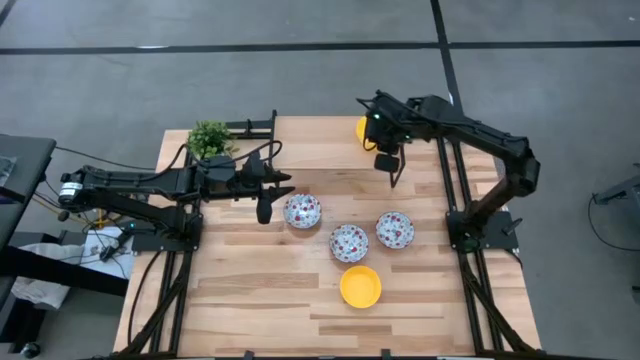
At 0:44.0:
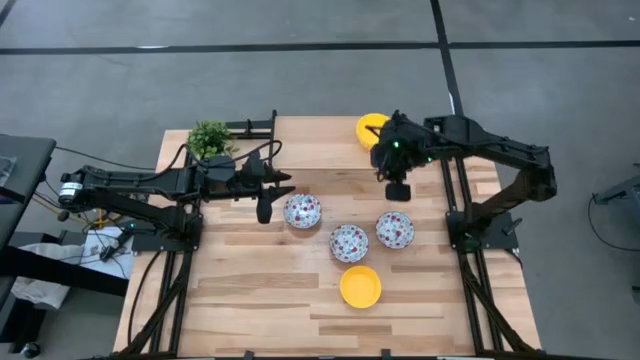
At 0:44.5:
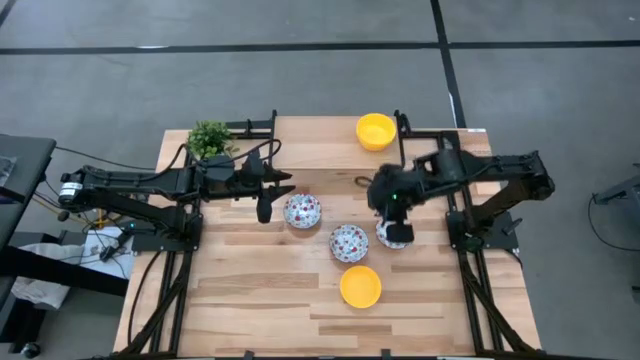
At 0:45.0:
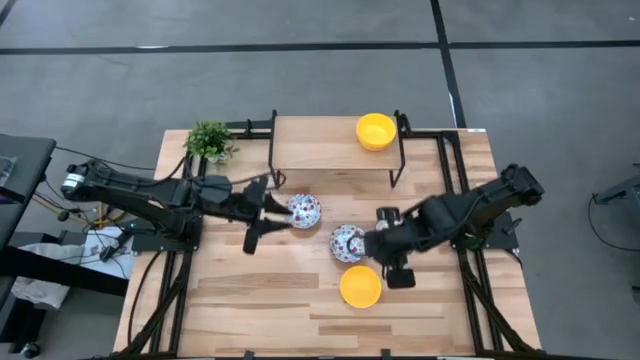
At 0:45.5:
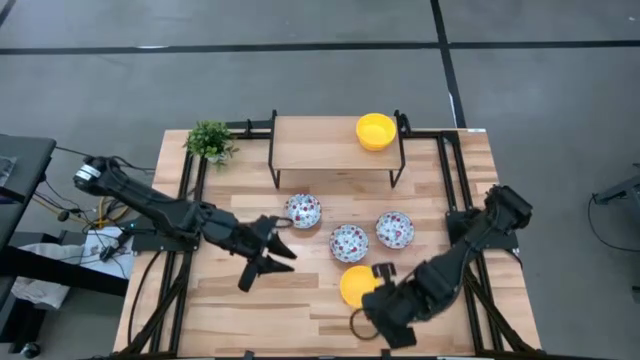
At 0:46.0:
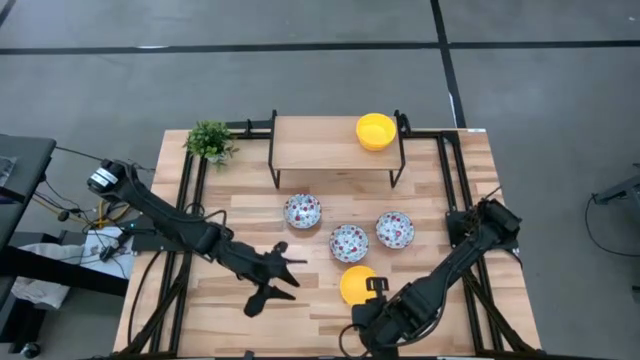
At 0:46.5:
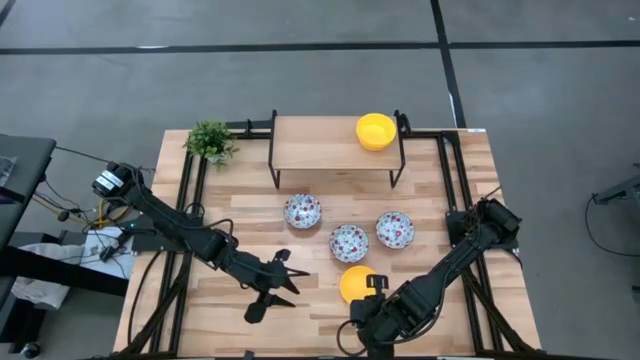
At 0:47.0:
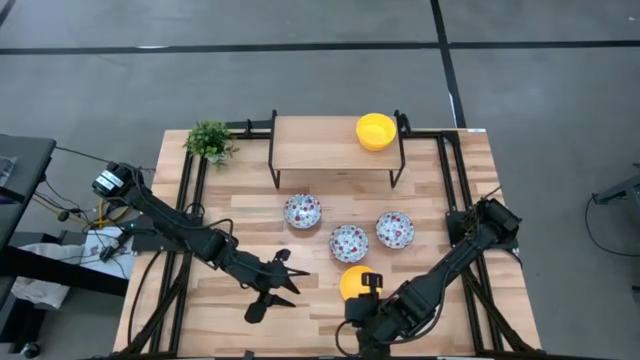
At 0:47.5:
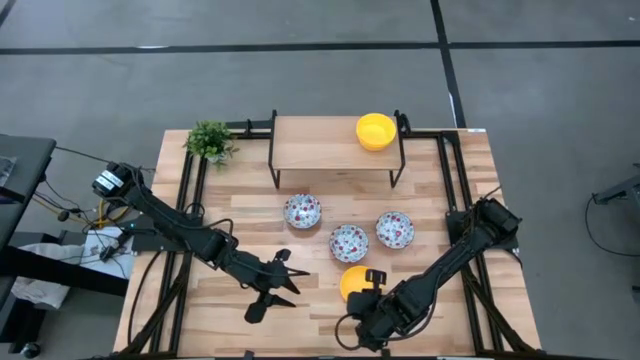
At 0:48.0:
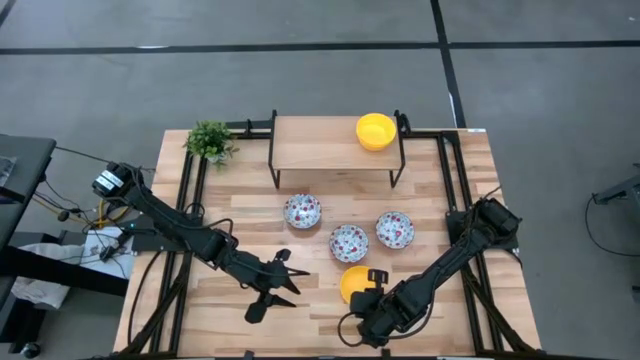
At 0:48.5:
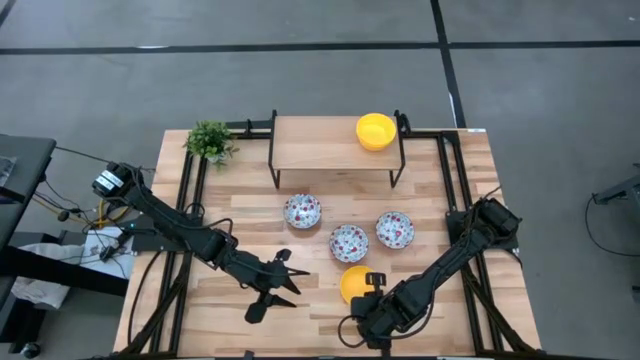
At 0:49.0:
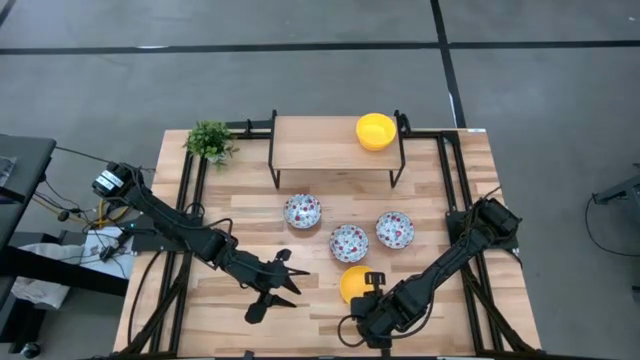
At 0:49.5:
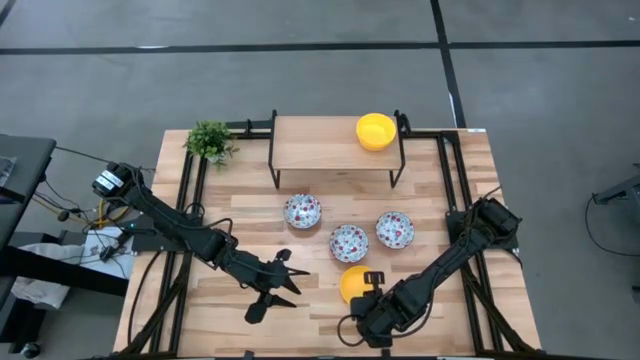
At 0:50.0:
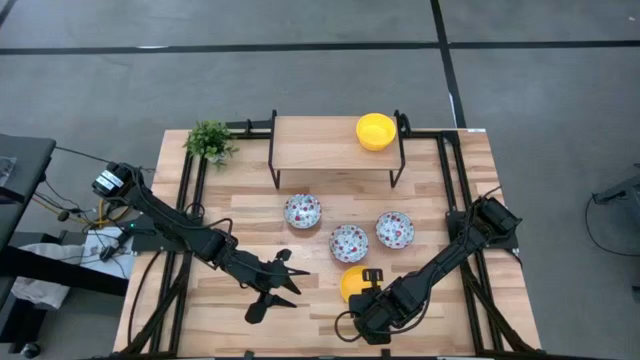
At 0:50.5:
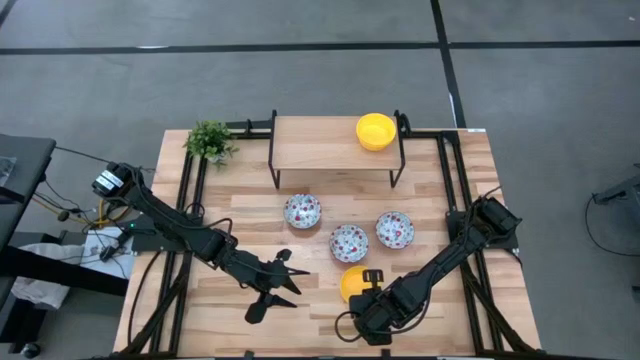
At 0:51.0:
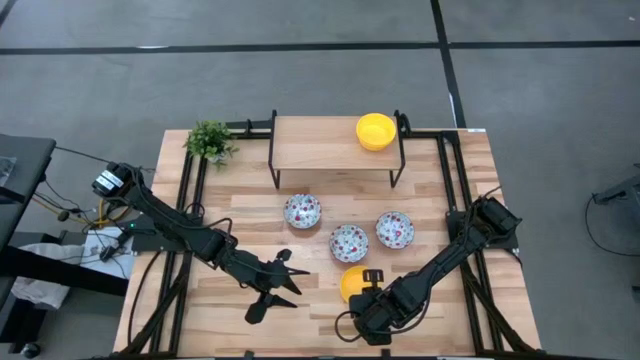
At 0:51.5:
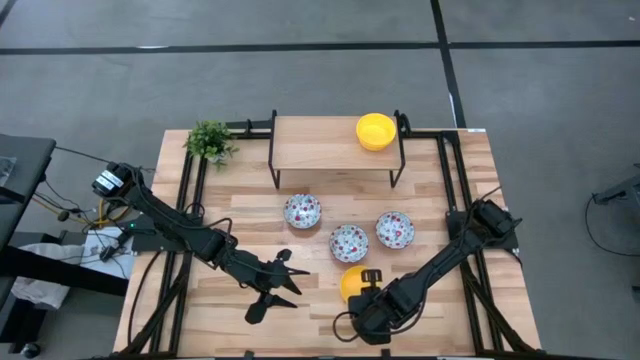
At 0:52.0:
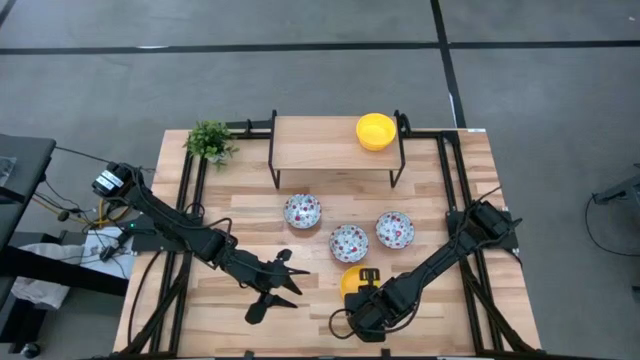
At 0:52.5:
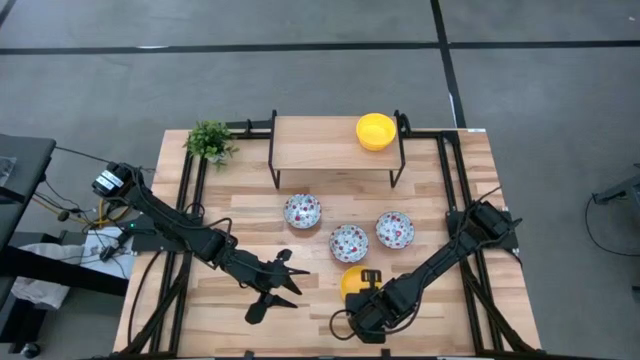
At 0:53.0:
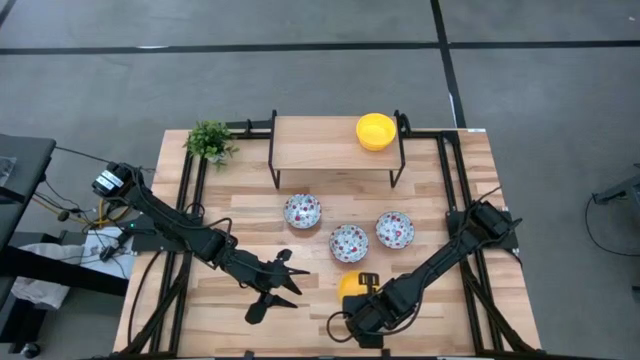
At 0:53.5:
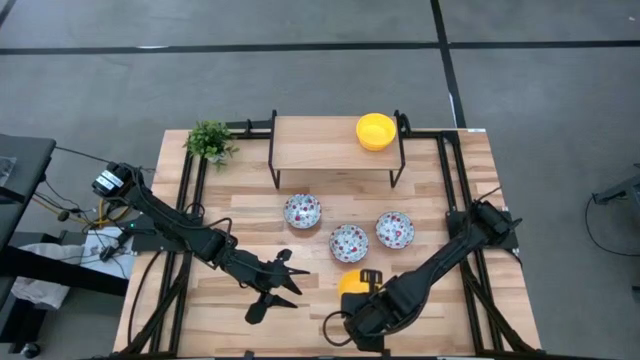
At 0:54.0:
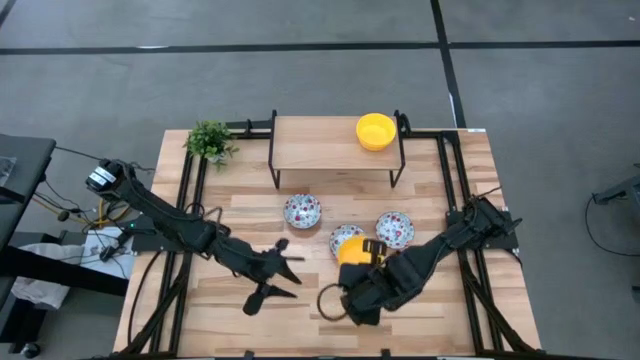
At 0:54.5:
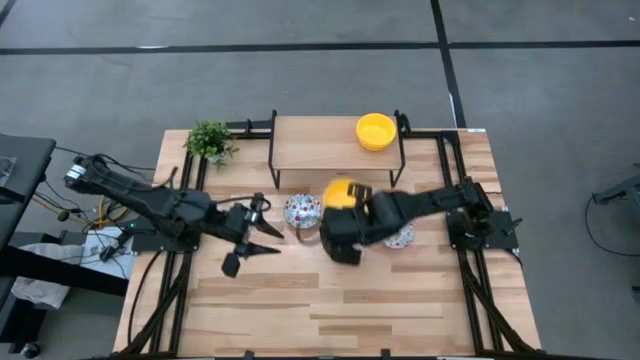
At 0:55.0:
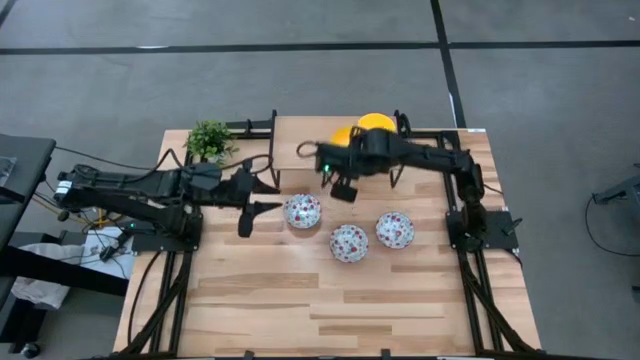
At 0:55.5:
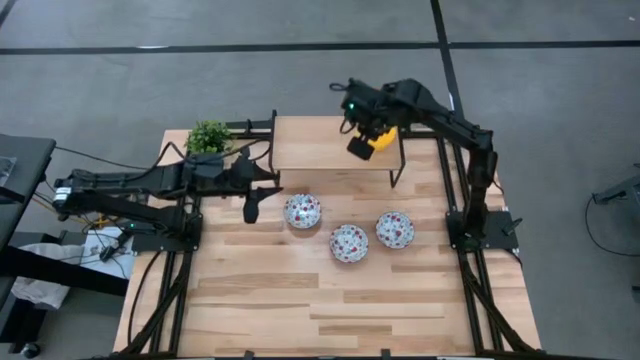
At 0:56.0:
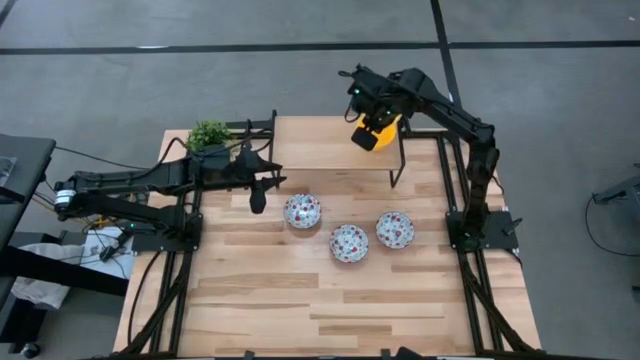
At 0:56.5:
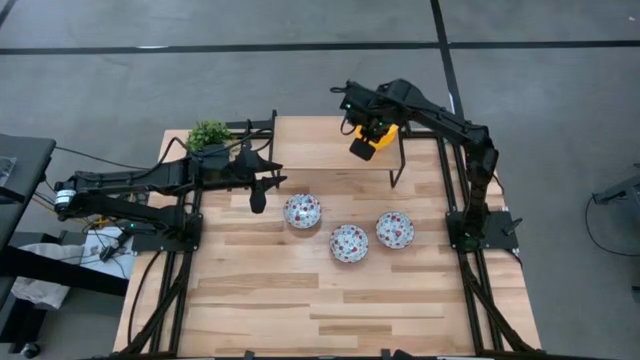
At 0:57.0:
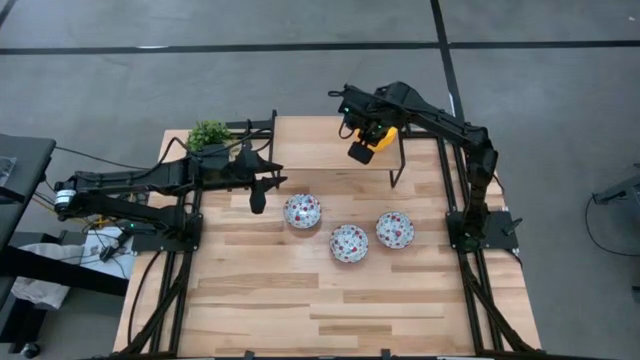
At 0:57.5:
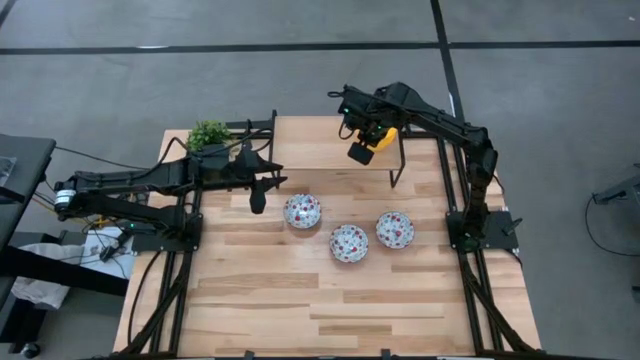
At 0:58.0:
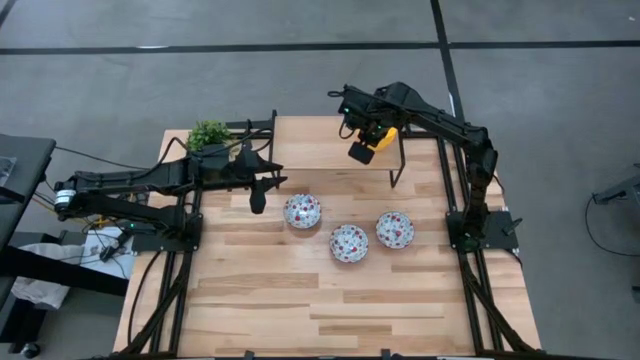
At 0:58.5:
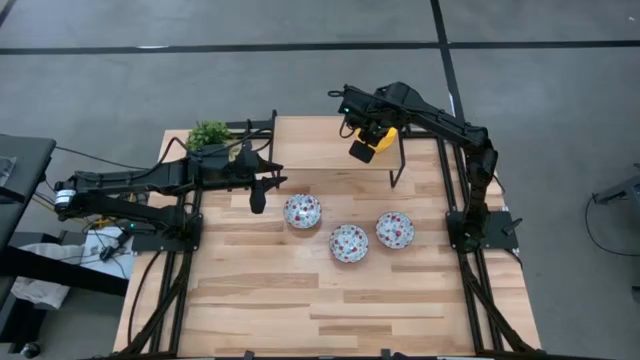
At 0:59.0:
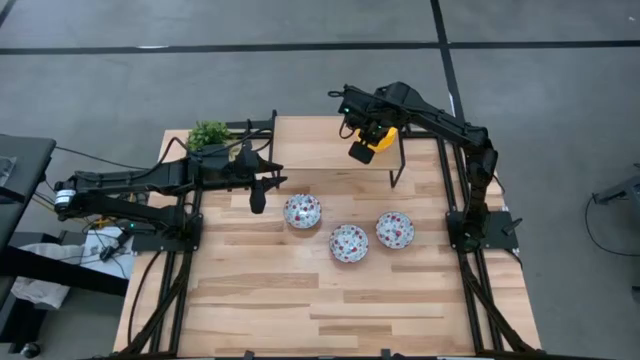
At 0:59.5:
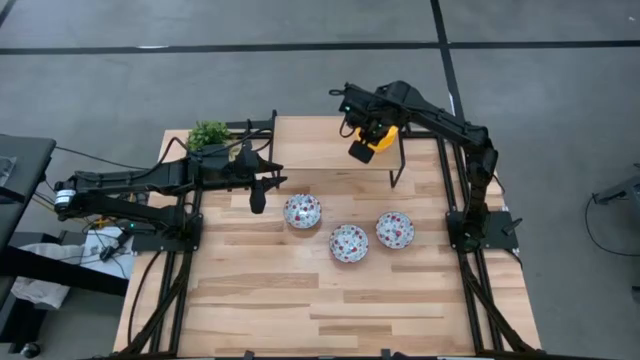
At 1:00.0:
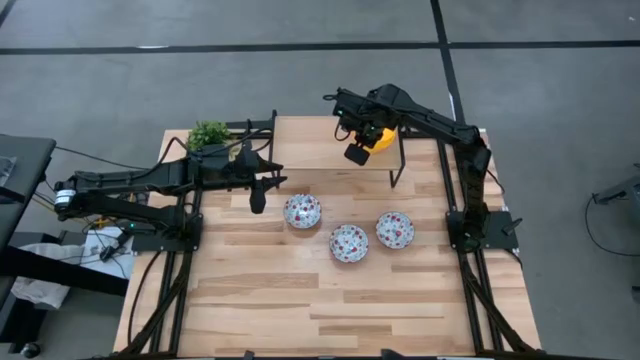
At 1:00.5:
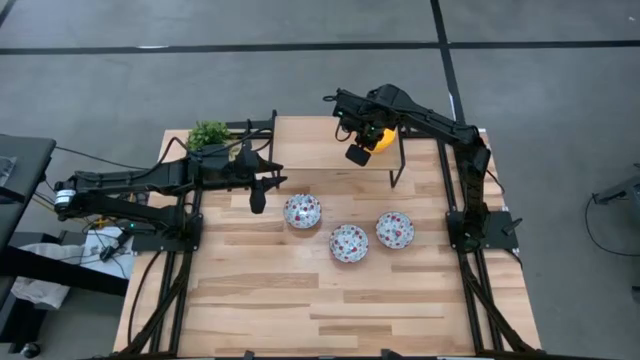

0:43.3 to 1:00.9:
Task: Pick & Place Mini bowls
Stack the yellow bowl on top of the yellow bowl on the shelf

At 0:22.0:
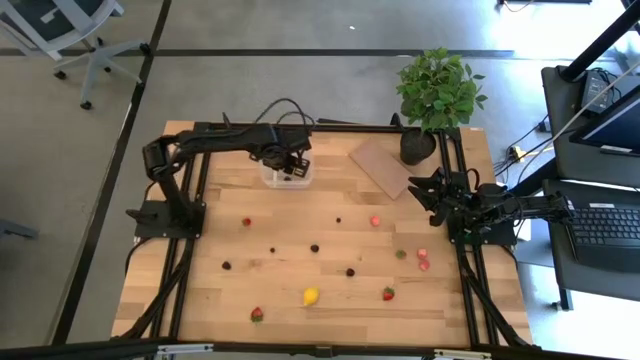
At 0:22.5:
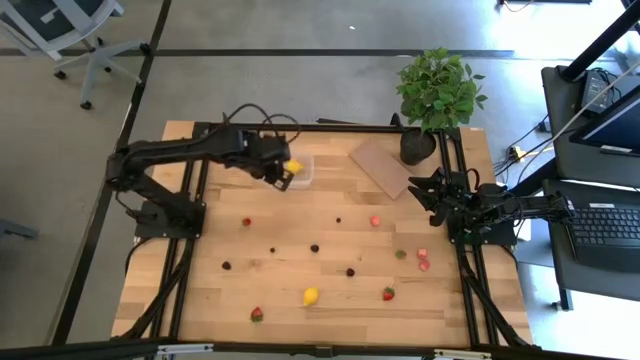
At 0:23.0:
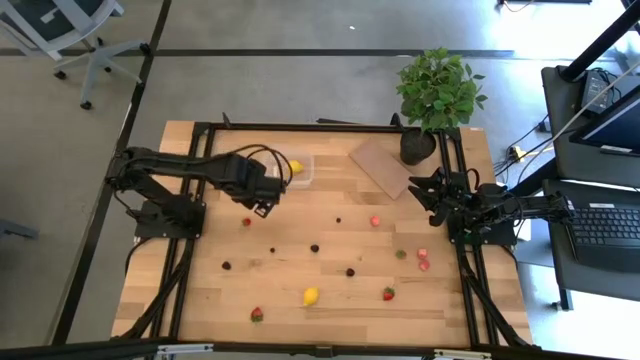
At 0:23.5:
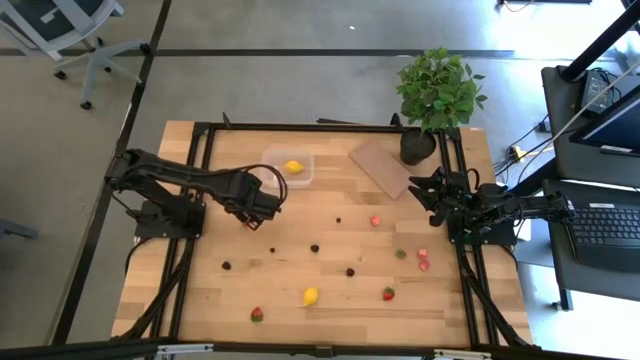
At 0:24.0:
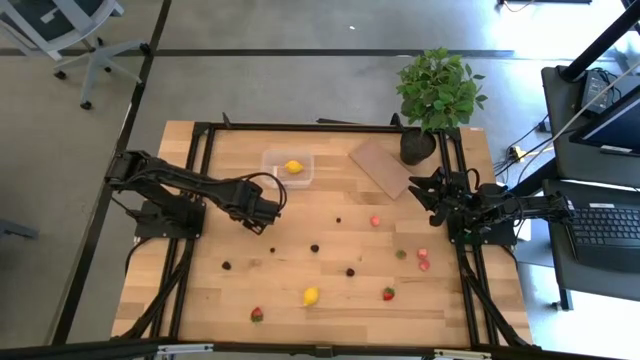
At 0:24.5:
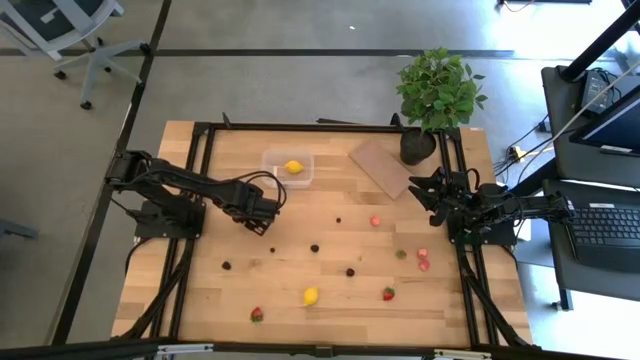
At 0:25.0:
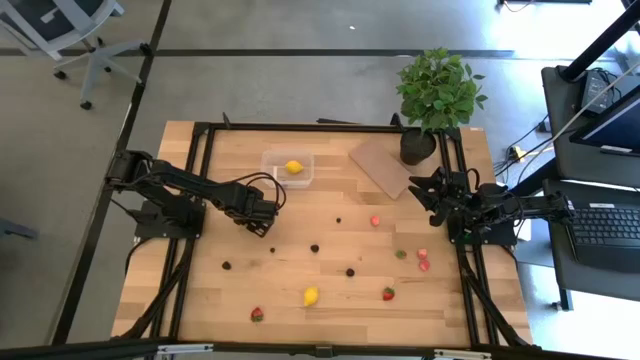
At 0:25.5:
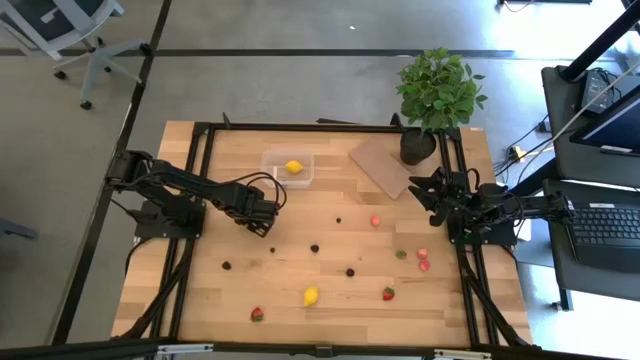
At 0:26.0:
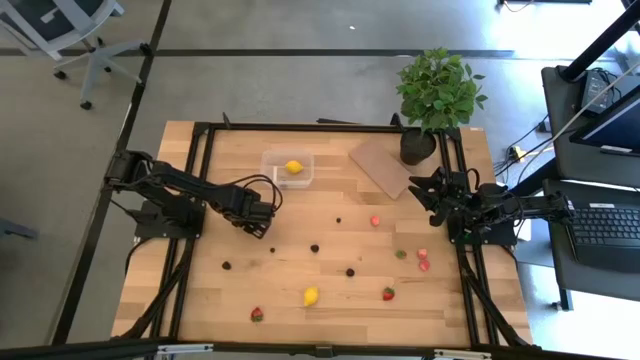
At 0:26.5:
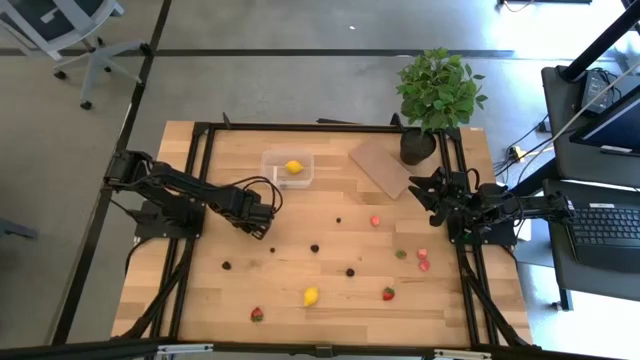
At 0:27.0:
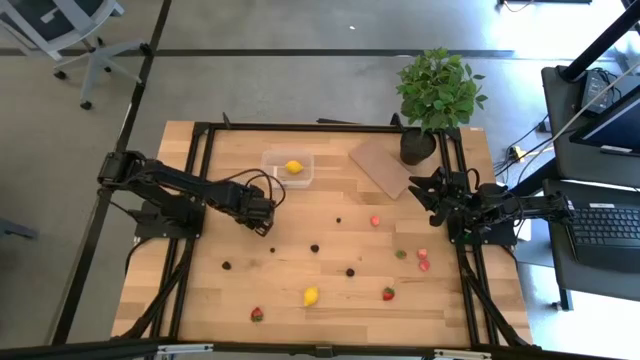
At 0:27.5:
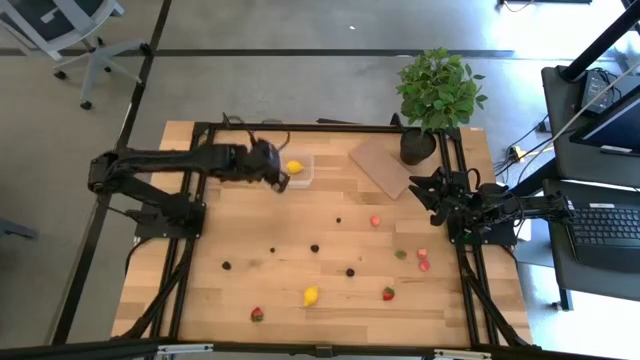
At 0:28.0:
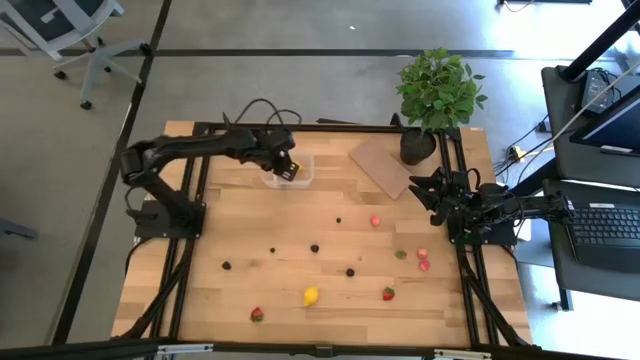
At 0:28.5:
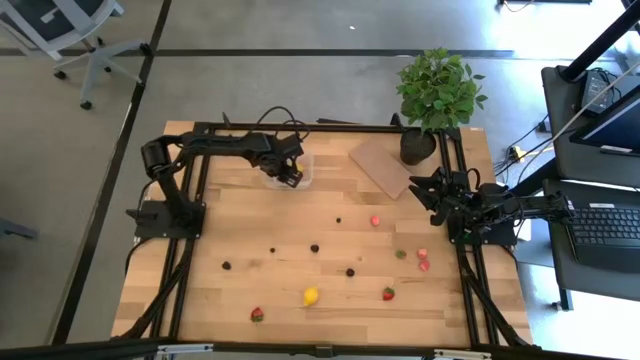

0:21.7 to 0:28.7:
Task: Pick and placing Produce into tupperware
Put the red strawberry into the transparent bin
